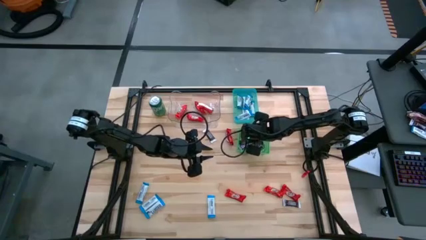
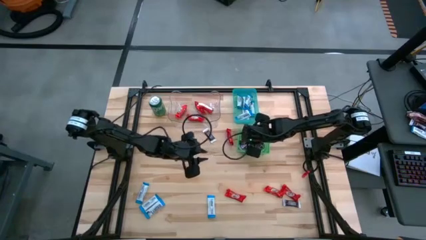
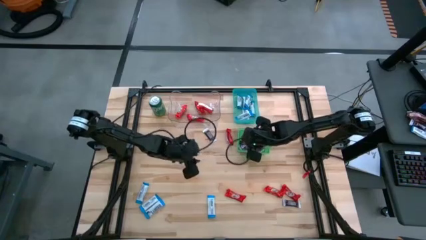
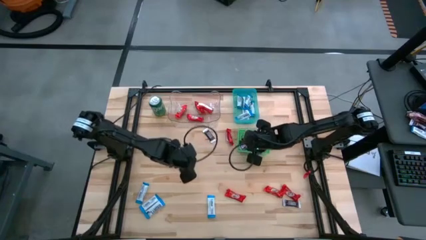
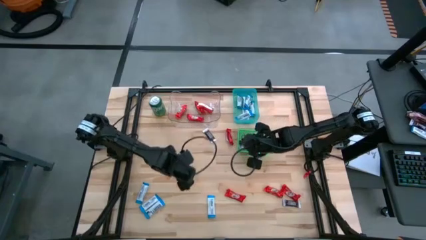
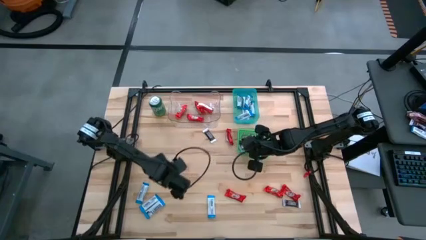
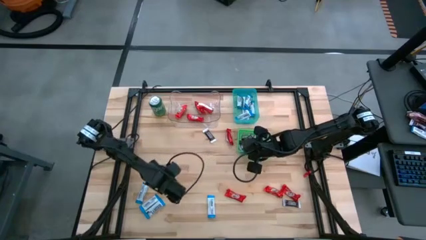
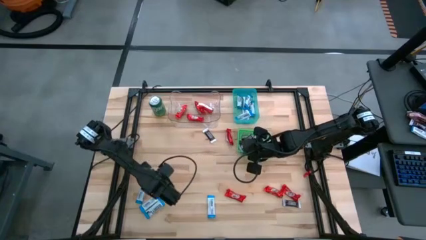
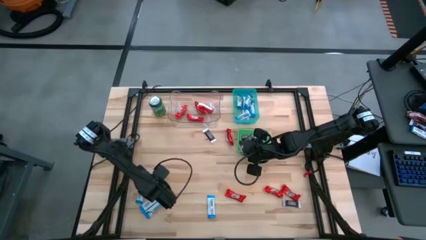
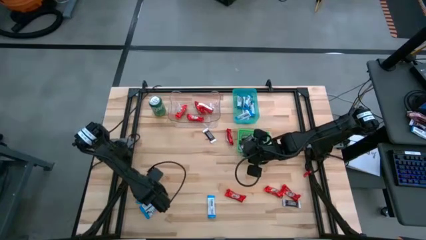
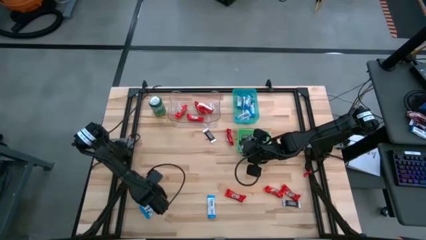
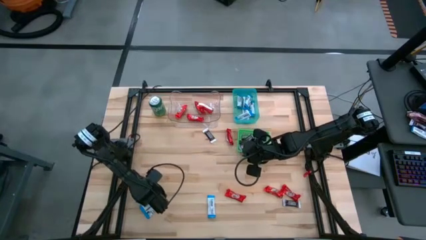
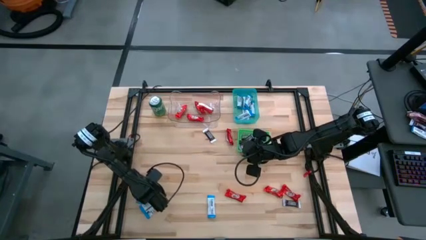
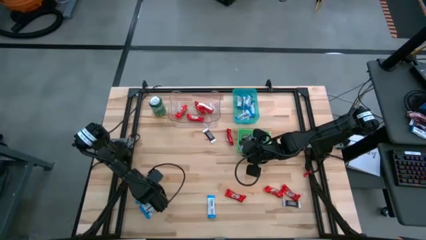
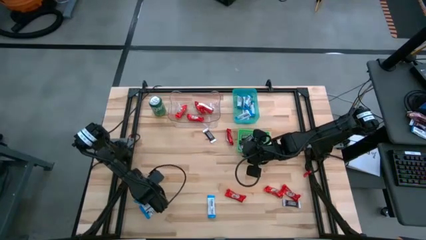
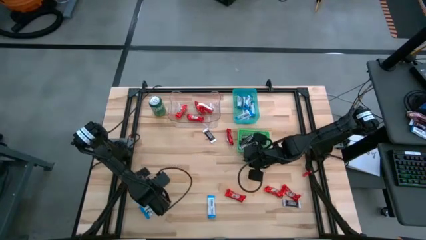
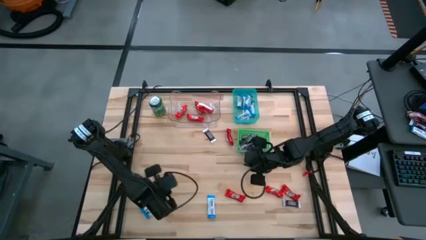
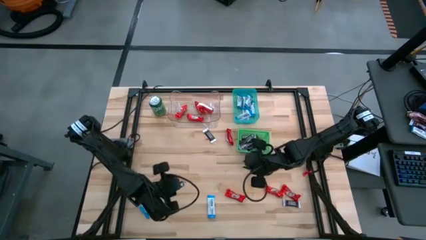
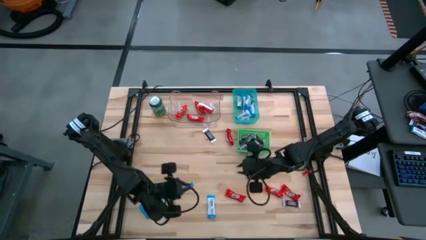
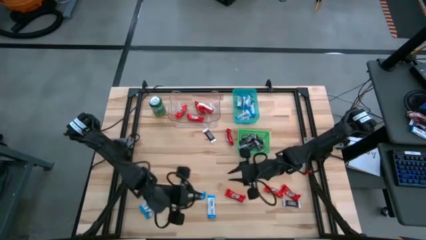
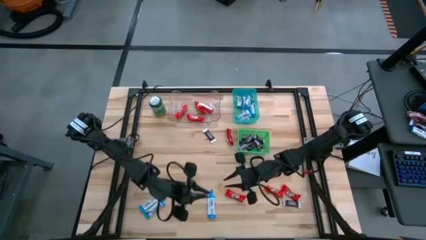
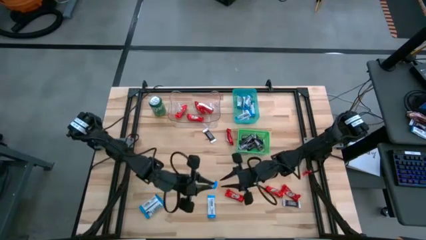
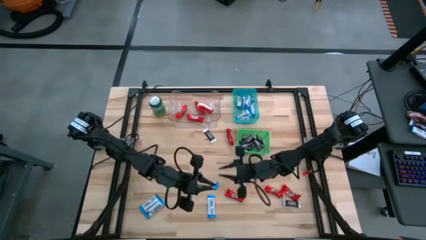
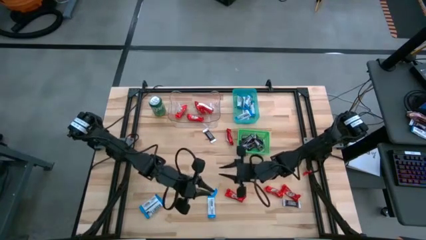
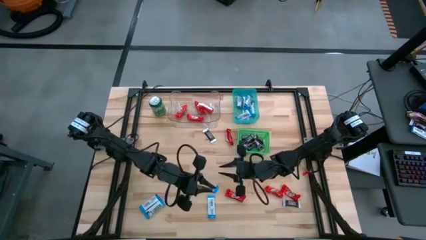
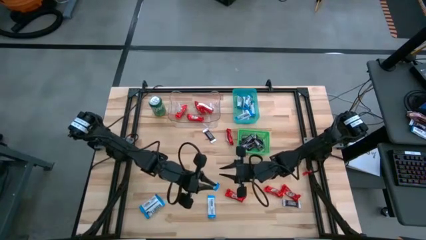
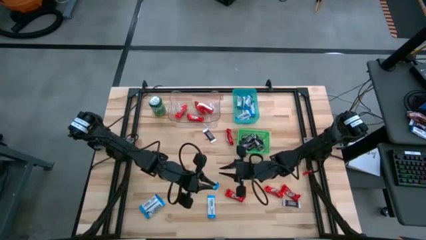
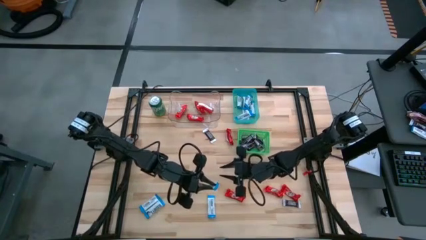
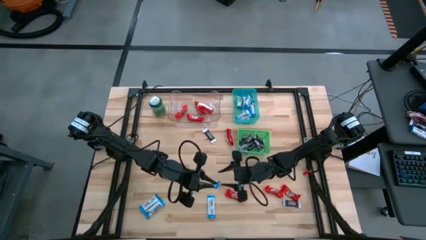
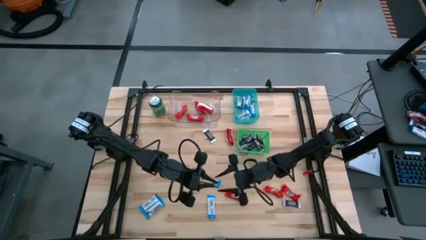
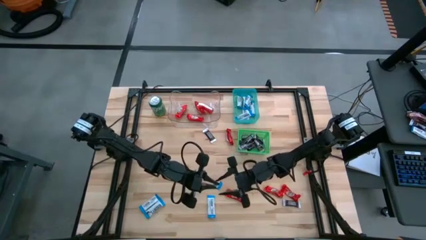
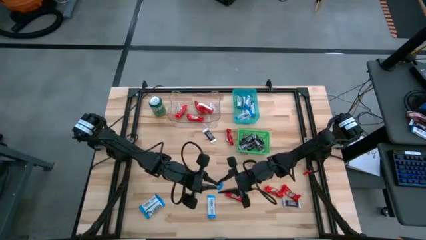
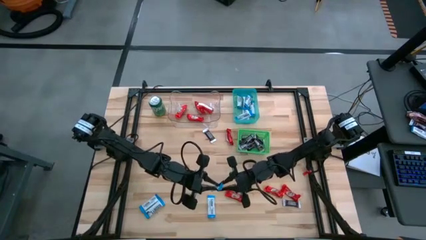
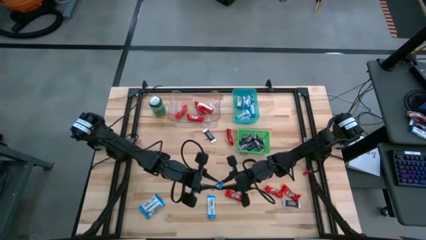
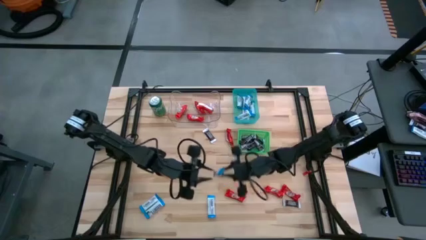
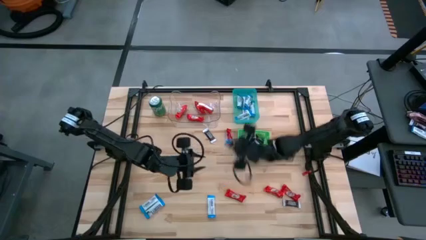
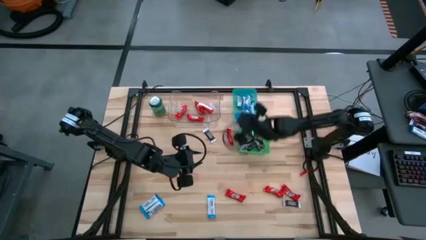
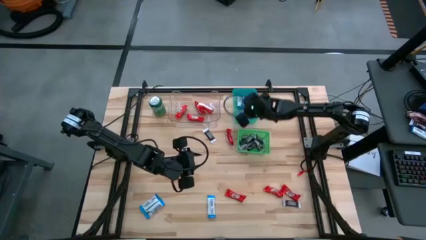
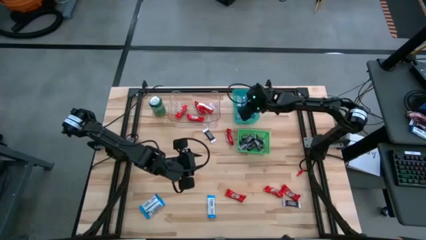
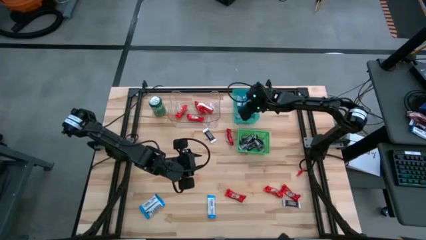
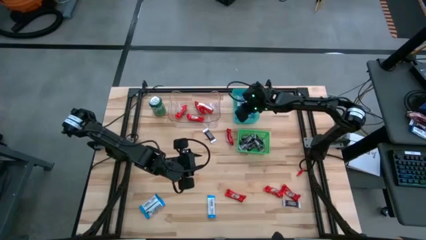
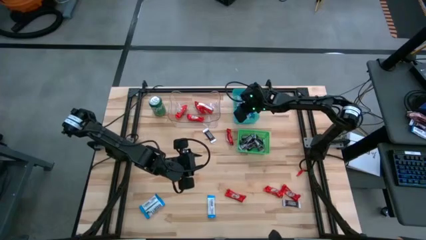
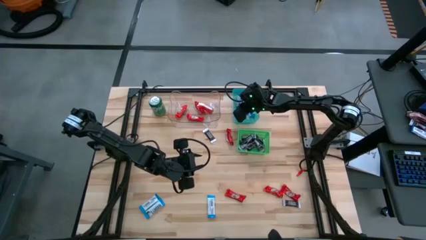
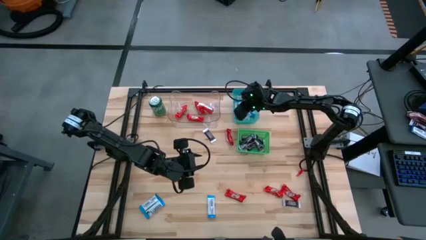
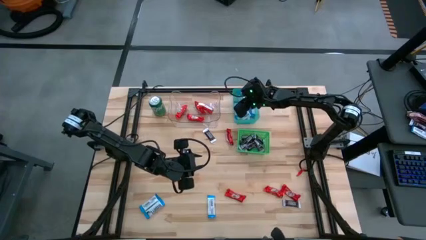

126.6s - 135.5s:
Task: Sort candy
Put the white chocolate bar into the blue bin

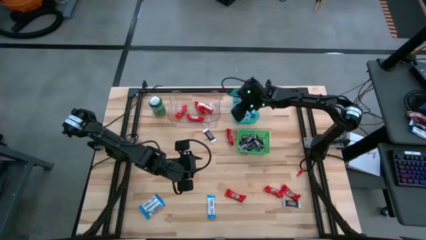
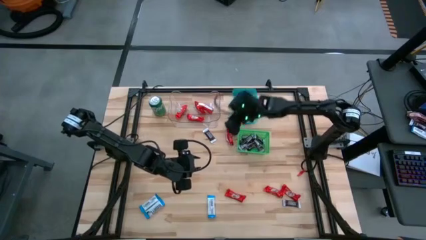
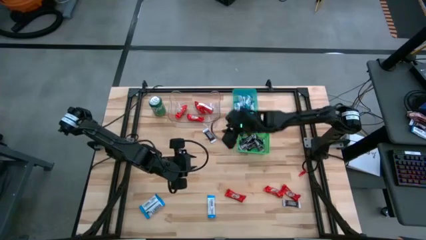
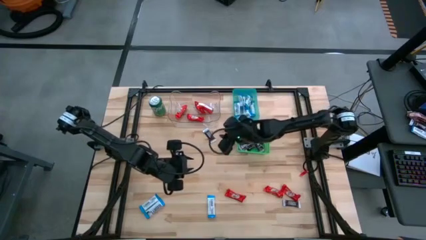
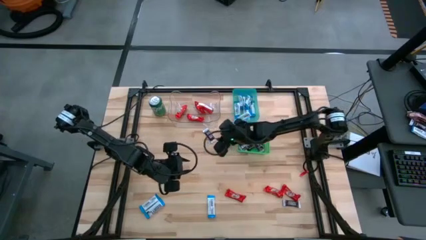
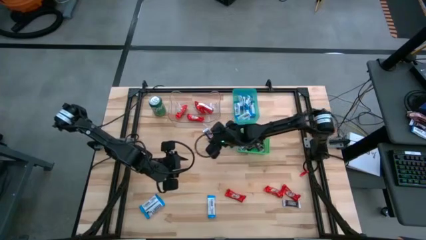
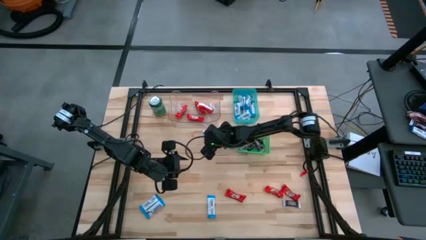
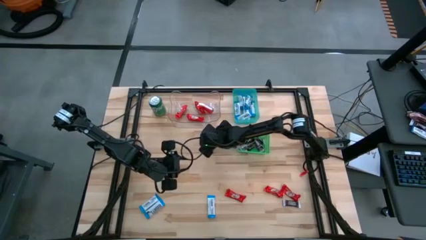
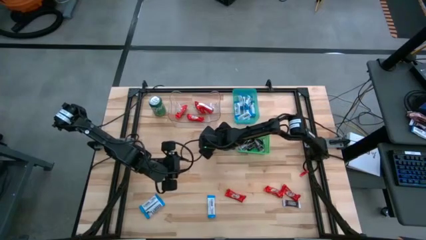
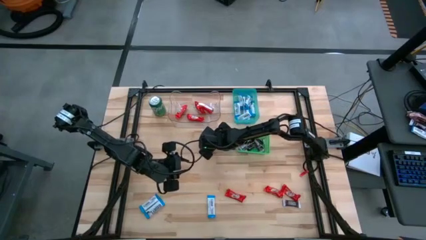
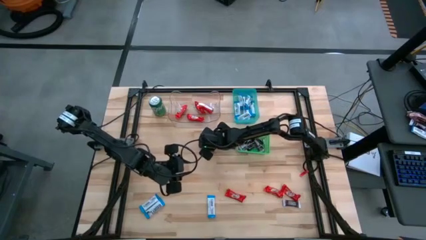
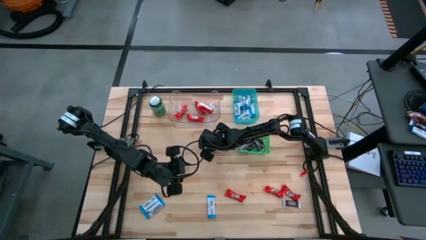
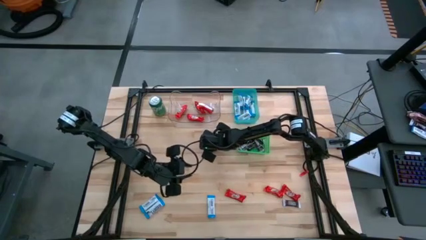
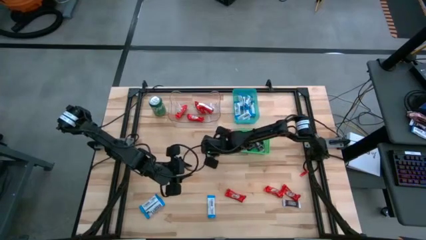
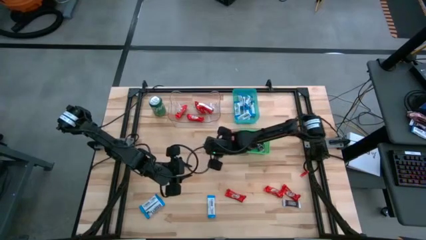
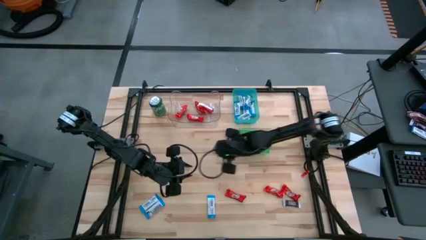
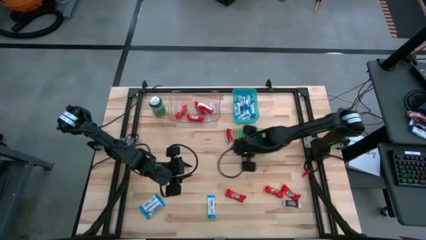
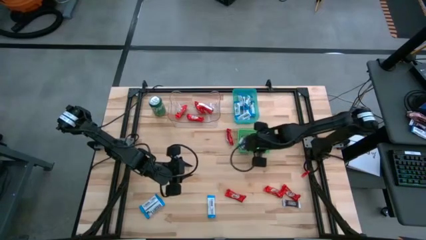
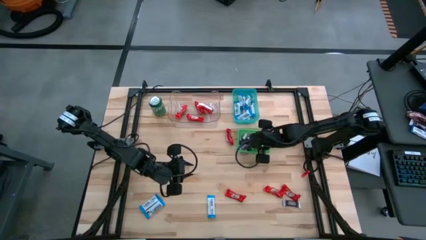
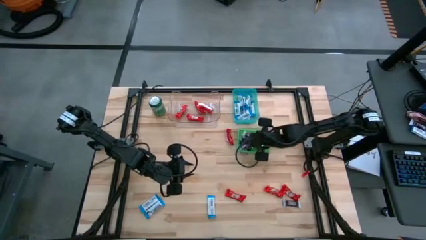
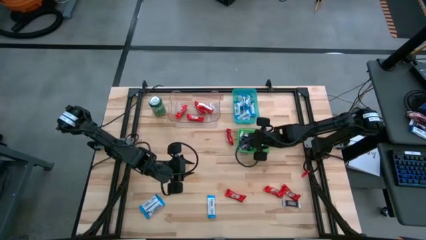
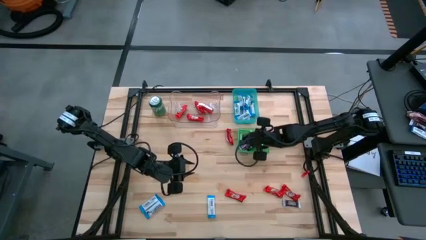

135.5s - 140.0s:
Put the brown chocolate bar into the green bin

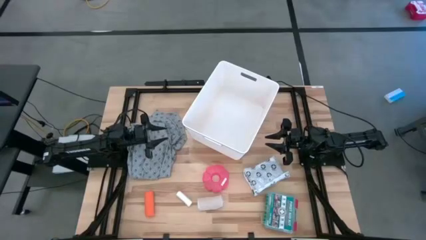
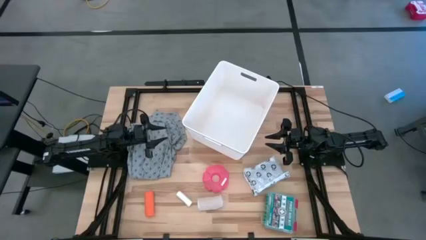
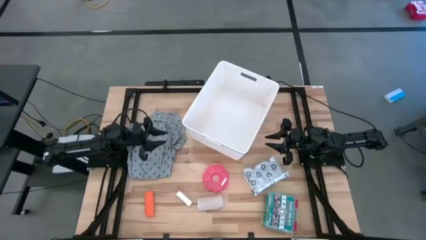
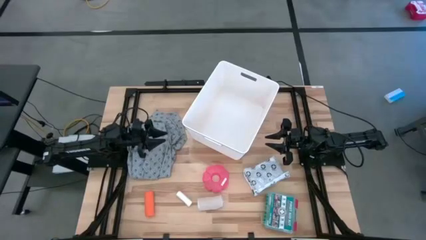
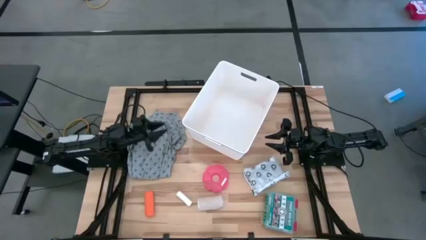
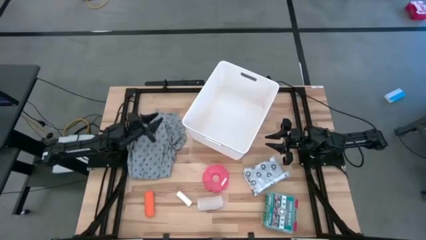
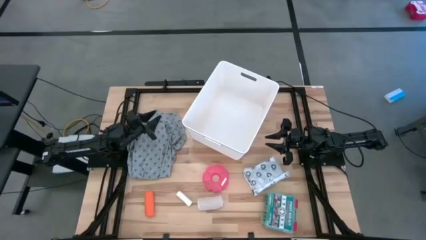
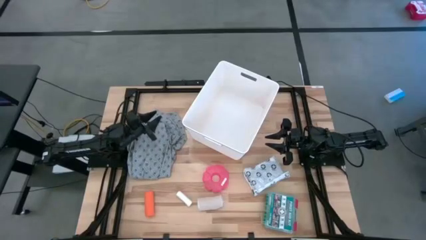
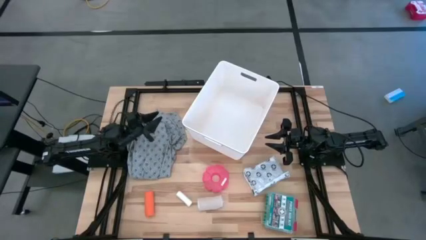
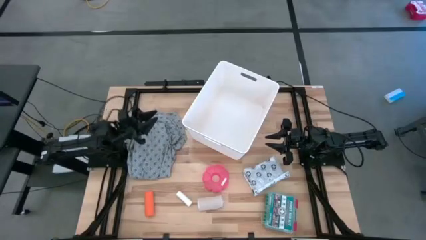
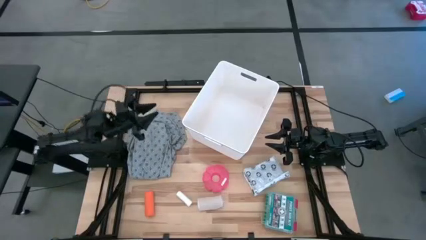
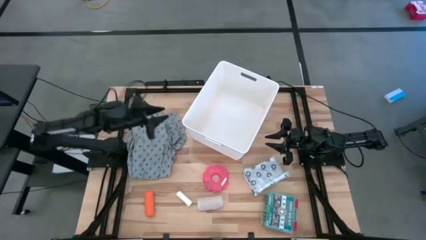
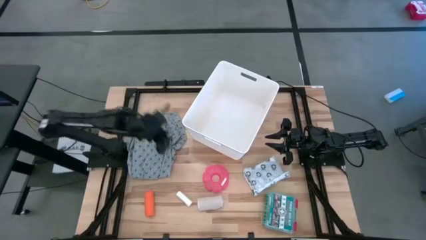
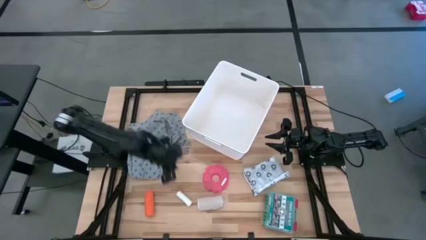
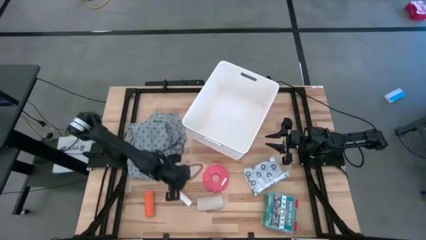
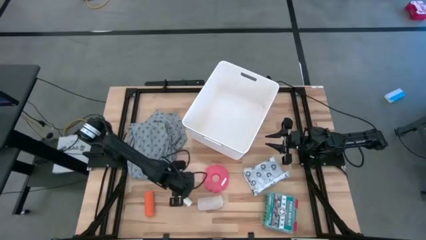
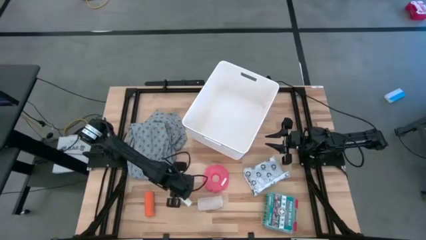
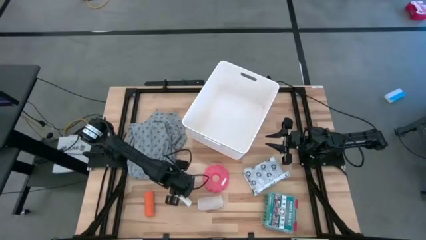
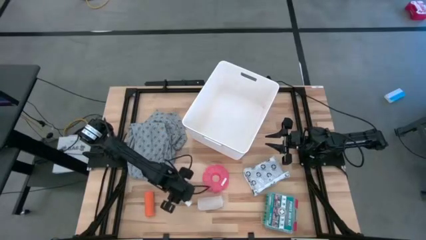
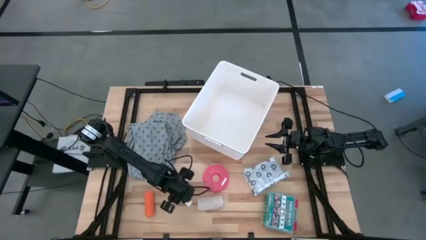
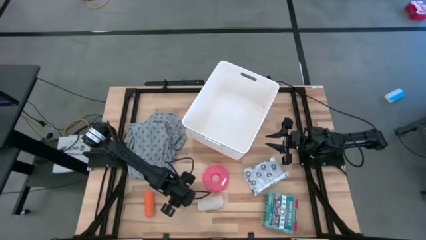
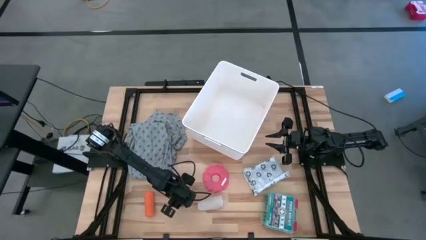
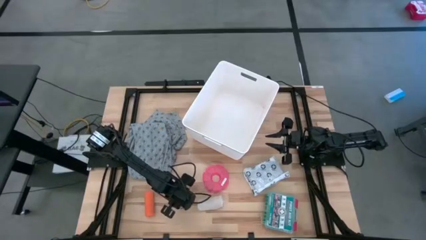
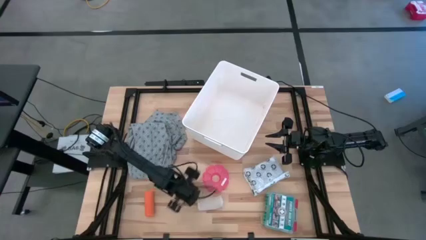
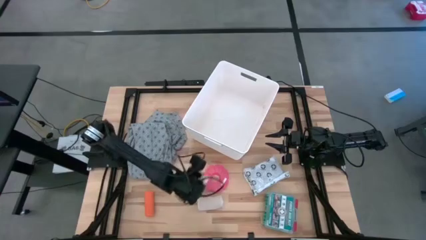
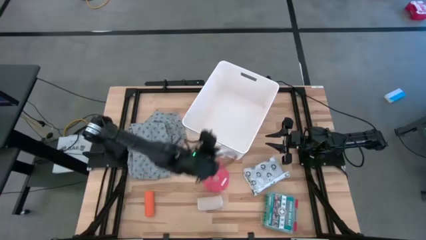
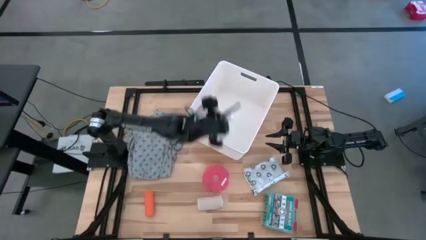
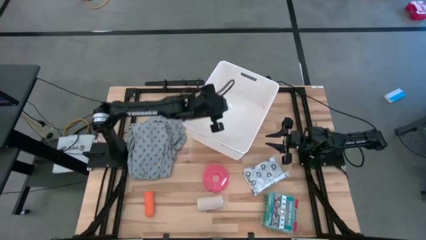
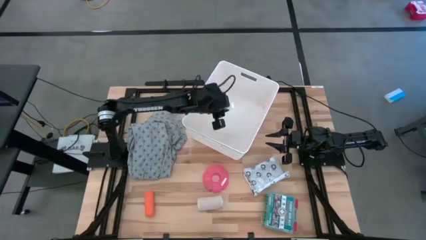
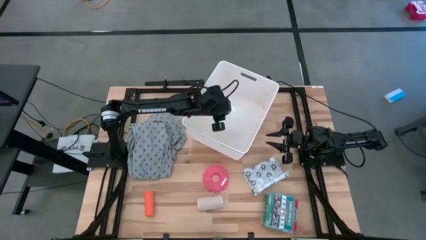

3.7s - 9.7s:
Task: Pick & place medical supplies in basket/bin
Put the white rolled gauze into the white bin
